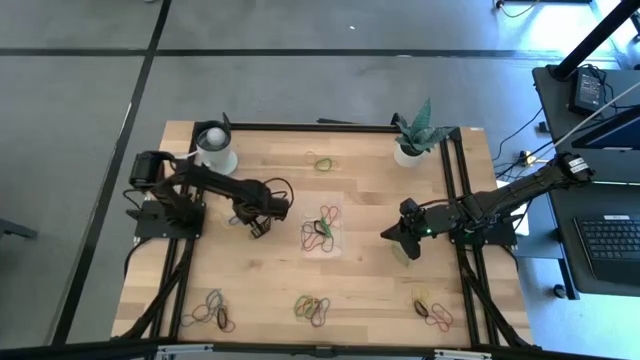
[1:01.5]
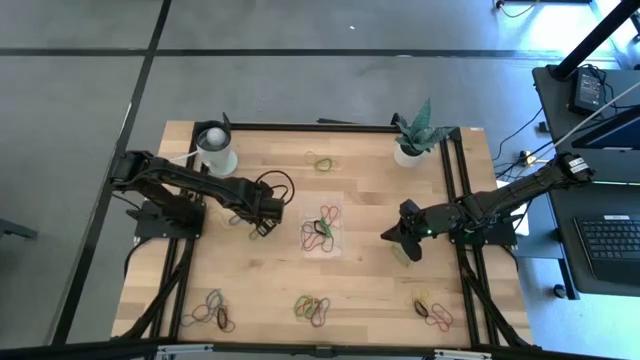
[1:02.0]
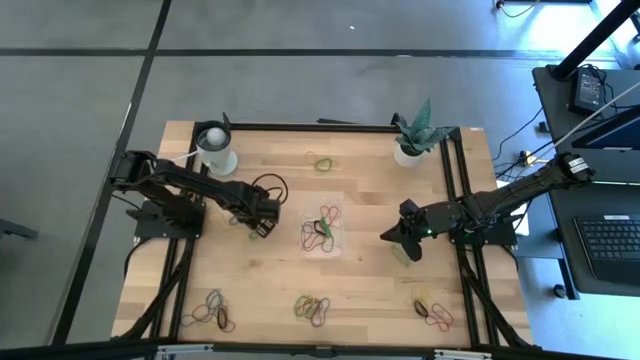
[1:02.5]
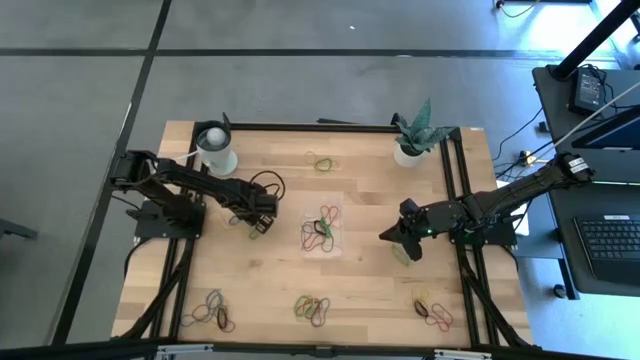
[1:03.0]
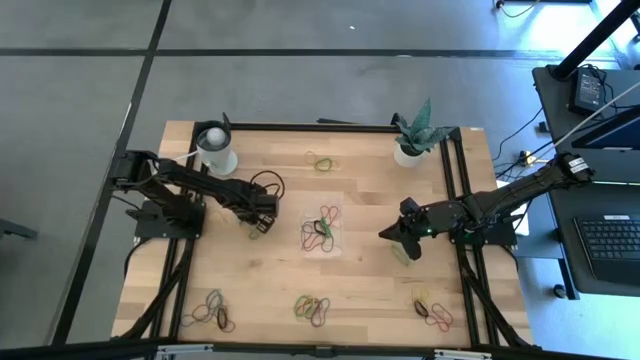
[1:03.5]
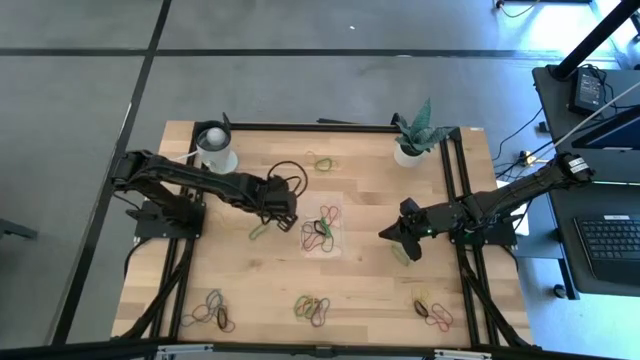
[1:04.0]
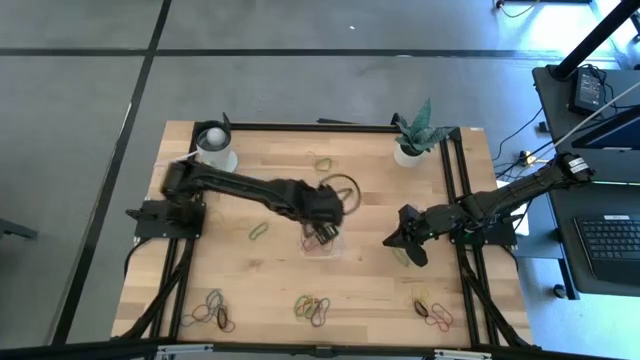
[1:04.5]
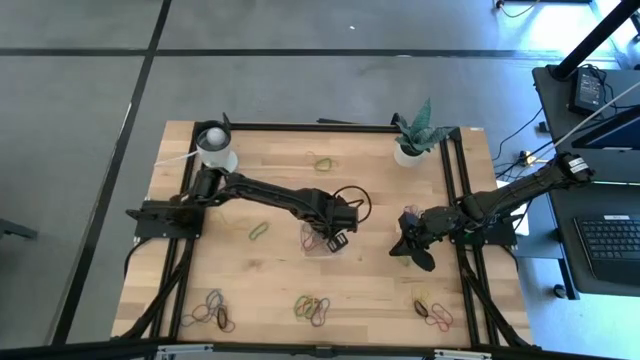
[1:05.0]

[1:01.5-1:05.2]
Task: Pick and place rubber bands into bin
Put the blue rubber band into the transparent bin

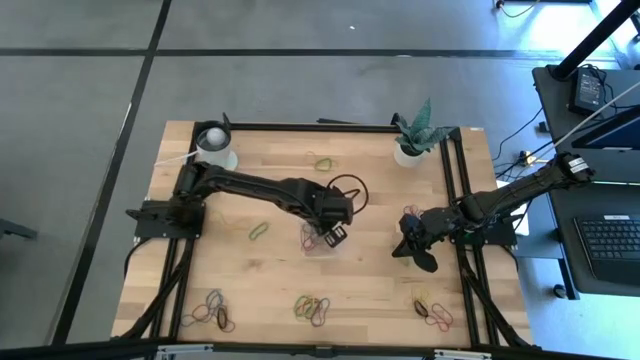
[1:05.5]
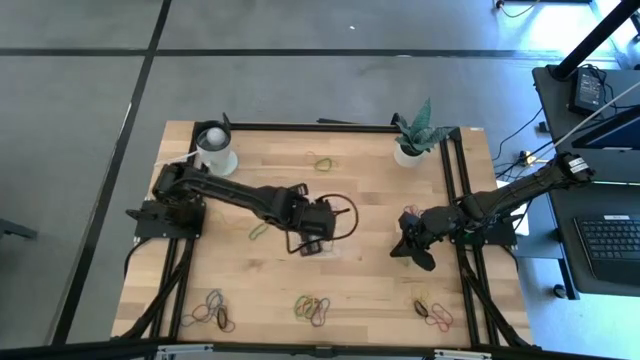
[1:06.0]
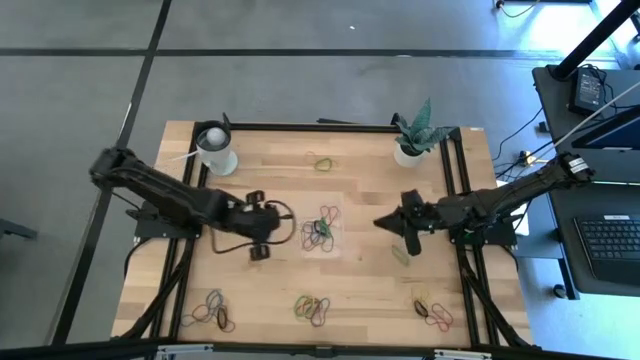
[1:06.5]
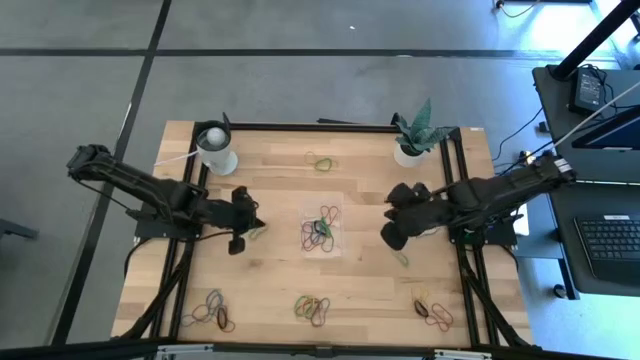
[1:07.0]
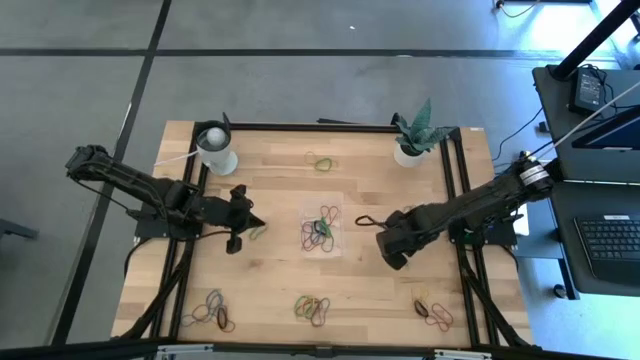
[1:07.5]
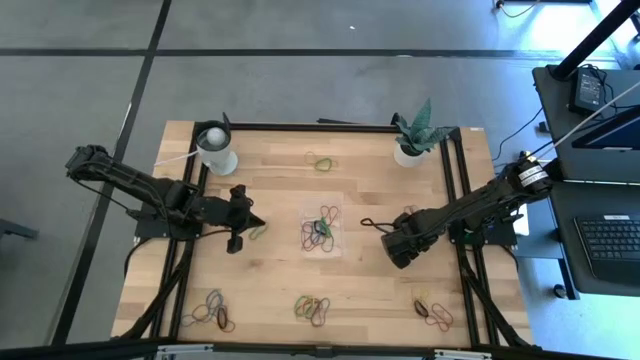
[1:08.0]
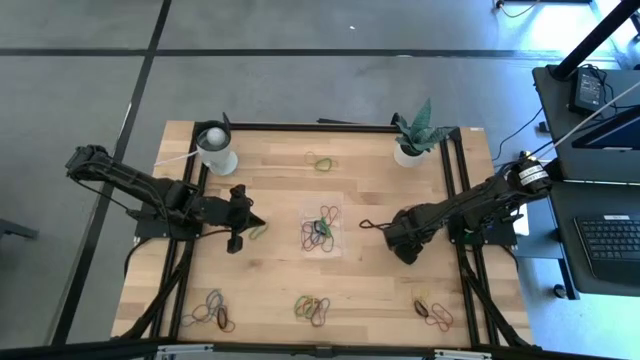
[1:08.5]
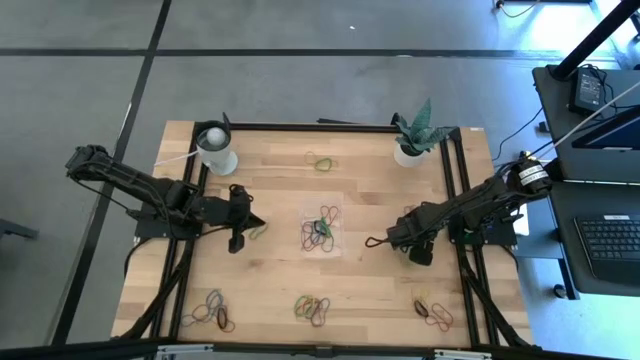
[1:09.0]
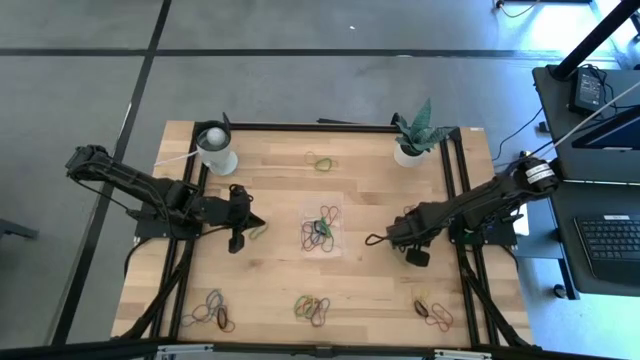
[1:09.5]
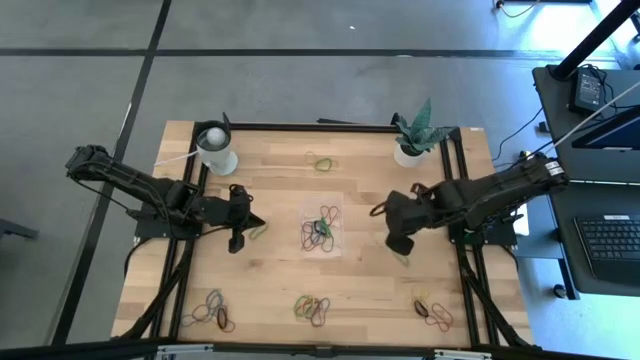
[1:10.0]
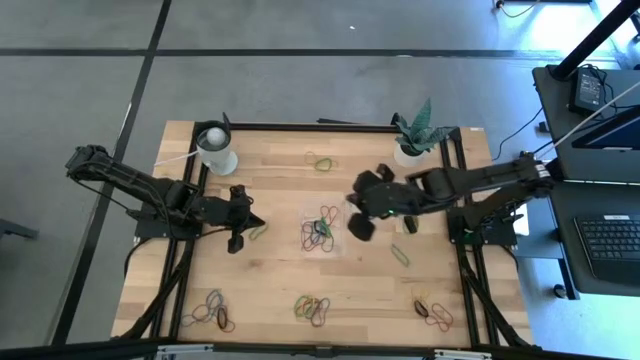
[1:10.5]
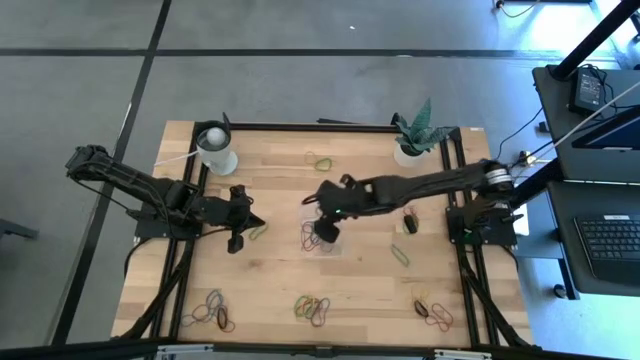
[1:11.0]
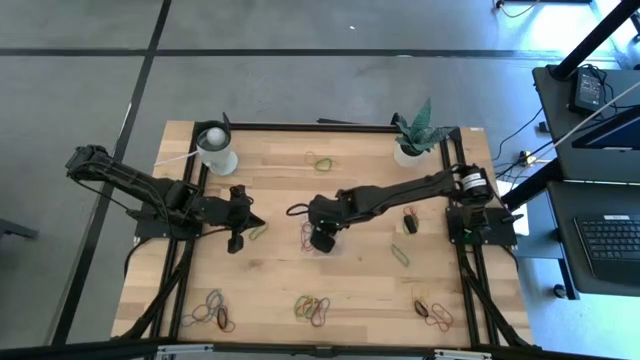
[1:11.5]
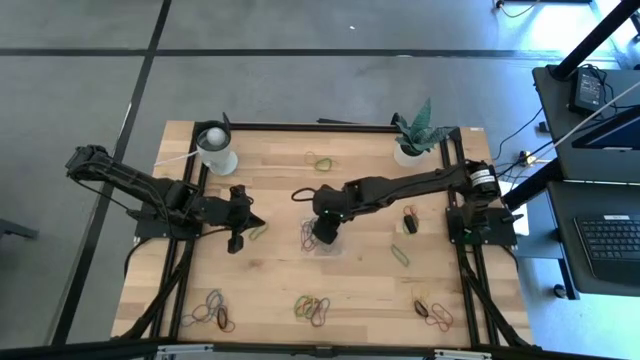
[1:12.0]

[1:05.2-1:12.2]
Put the blue rubber band into the transparent bin

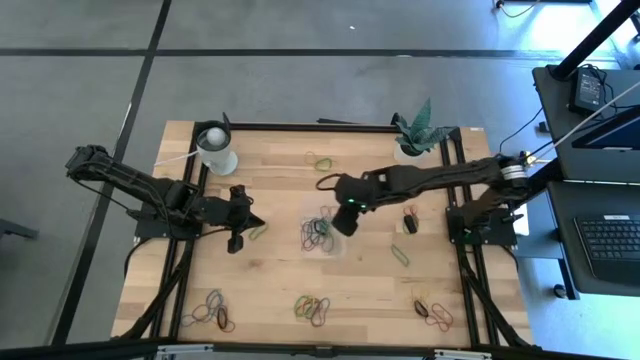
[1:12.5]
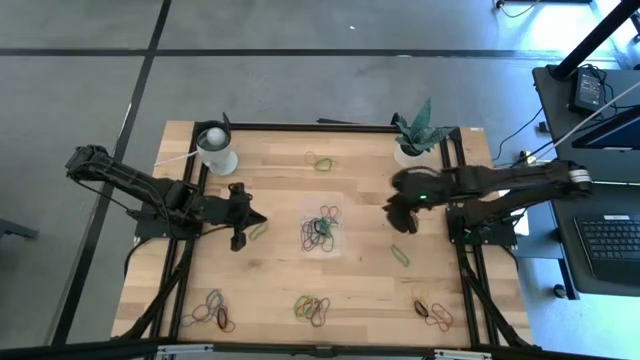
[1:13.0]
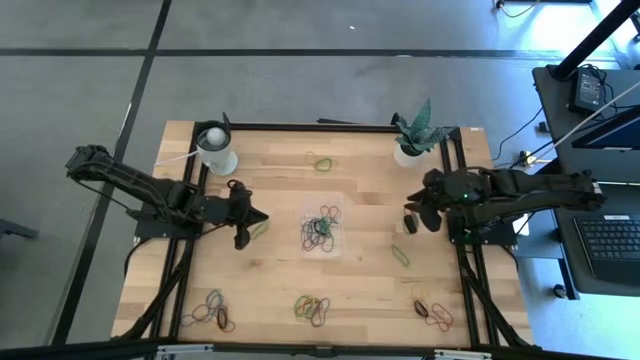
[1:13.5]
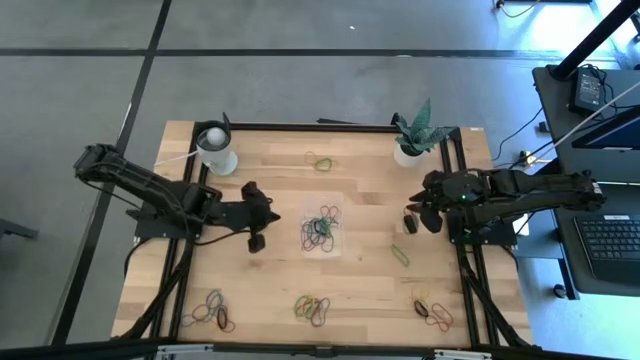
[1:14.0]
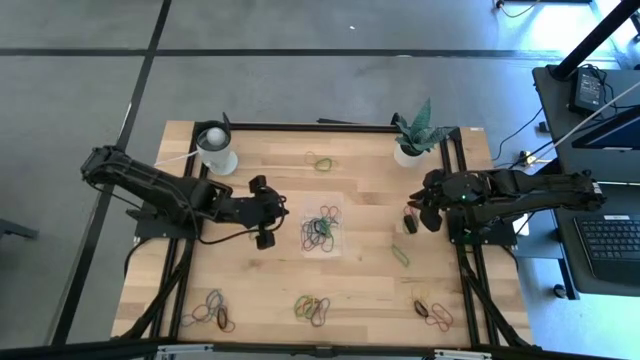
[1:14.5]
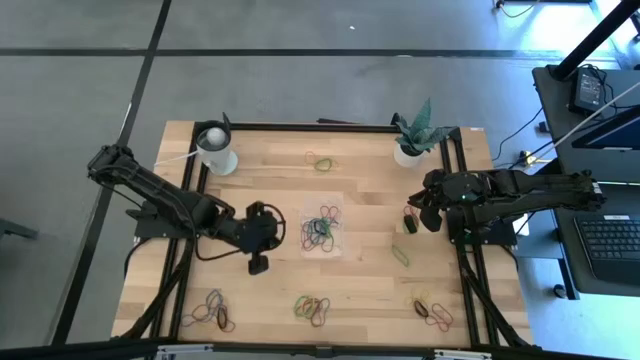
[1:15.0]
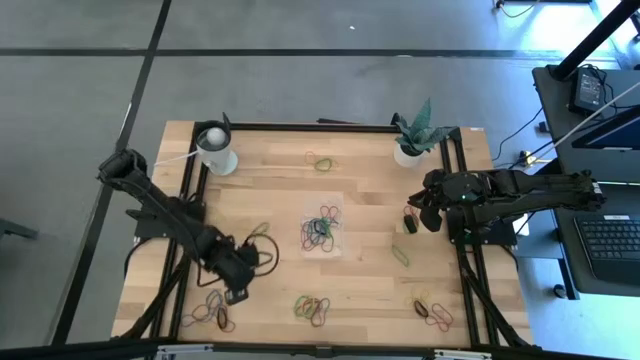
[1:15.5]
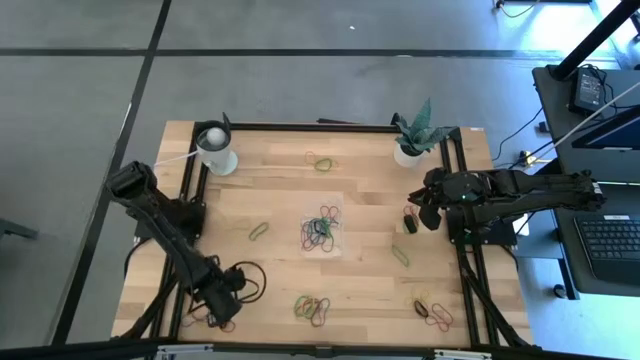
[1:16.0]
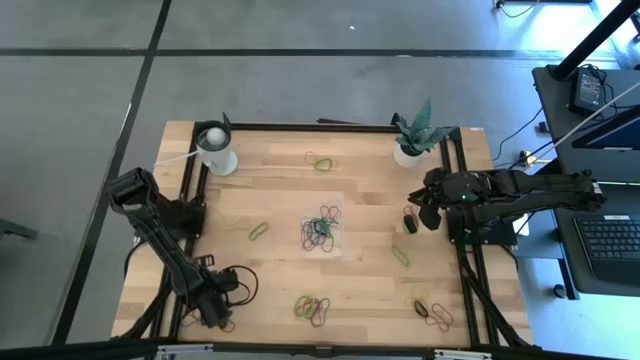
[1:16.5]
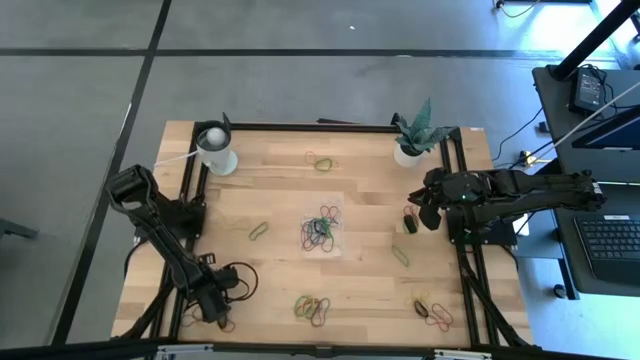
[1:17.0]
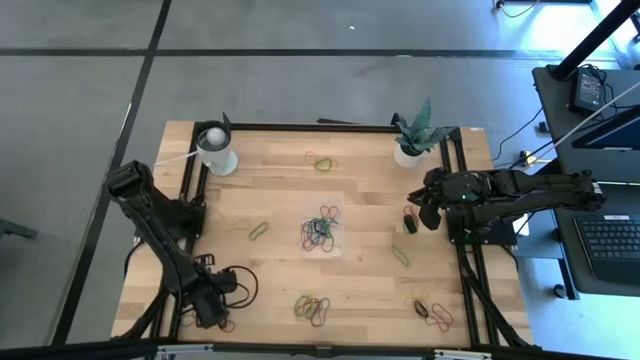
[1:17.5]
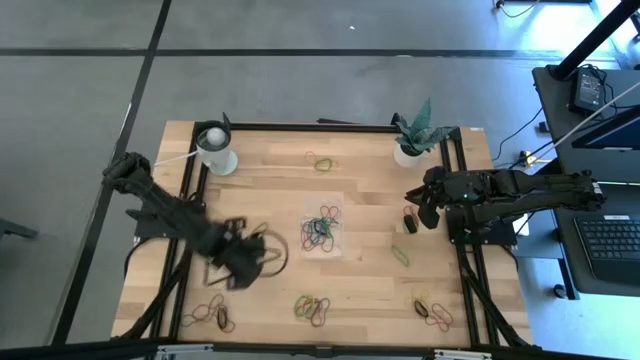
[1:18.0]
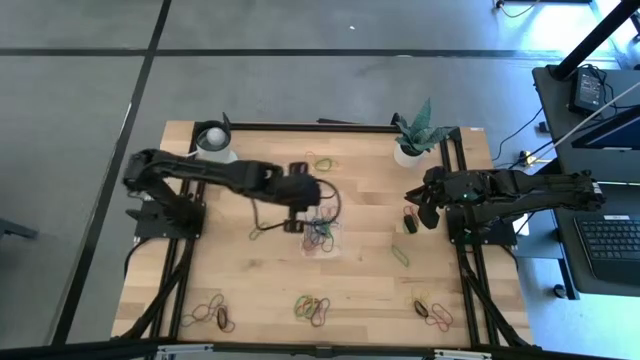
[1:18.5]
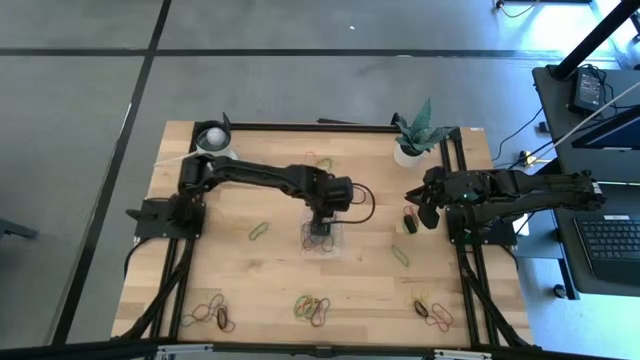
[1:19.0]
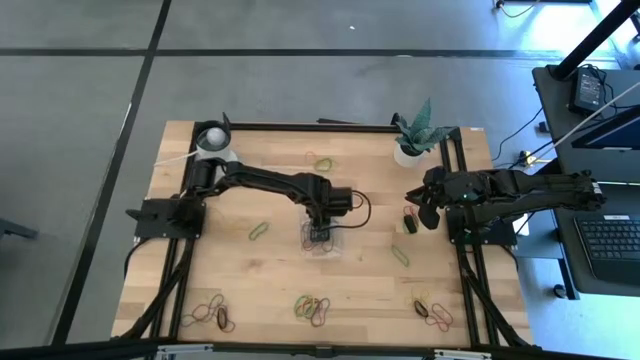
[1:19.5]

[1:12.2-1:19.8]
Put the blue rubber band into the transparent bin

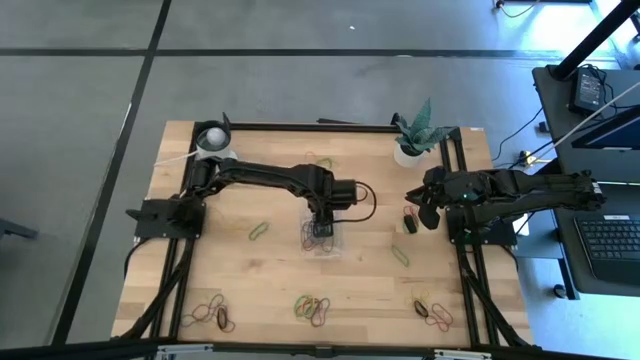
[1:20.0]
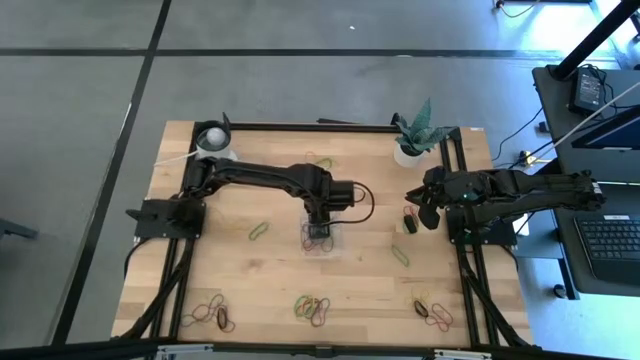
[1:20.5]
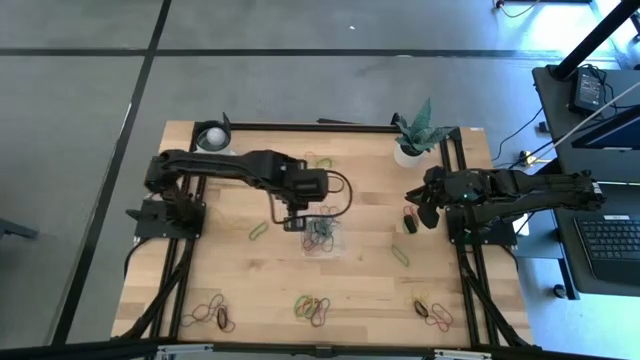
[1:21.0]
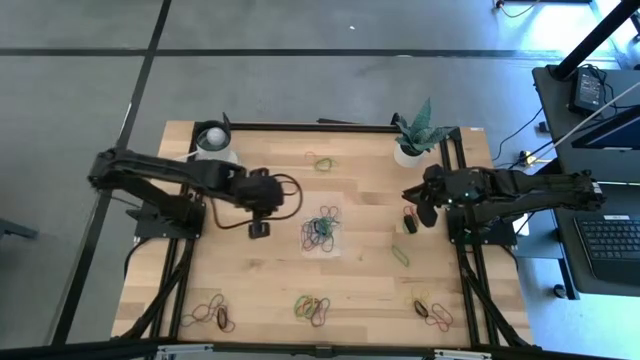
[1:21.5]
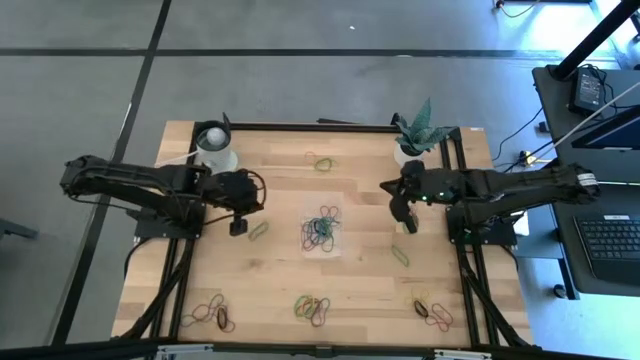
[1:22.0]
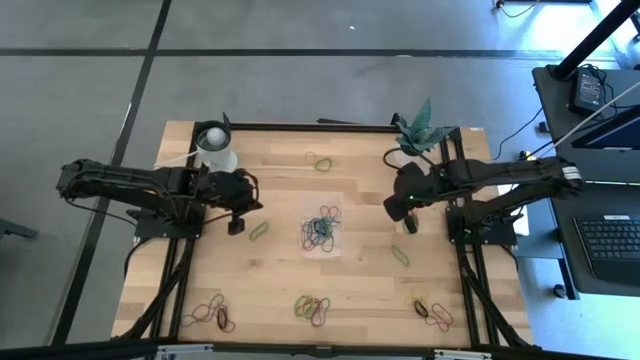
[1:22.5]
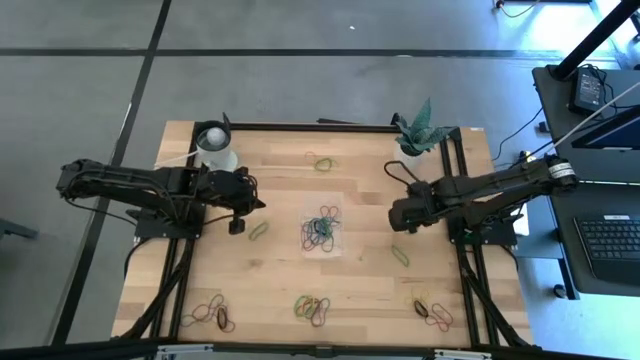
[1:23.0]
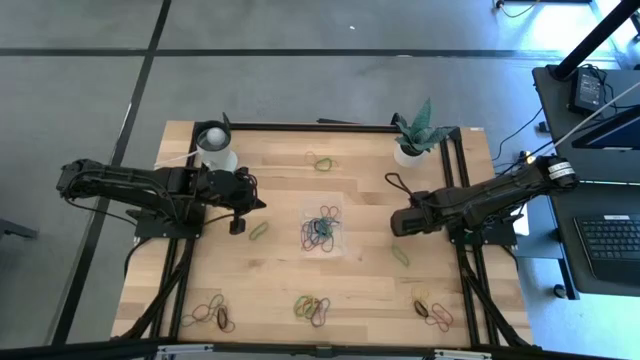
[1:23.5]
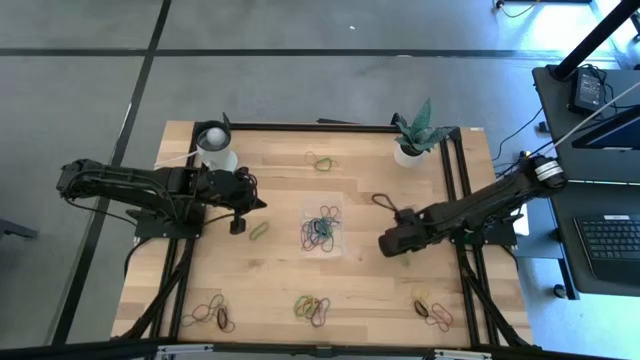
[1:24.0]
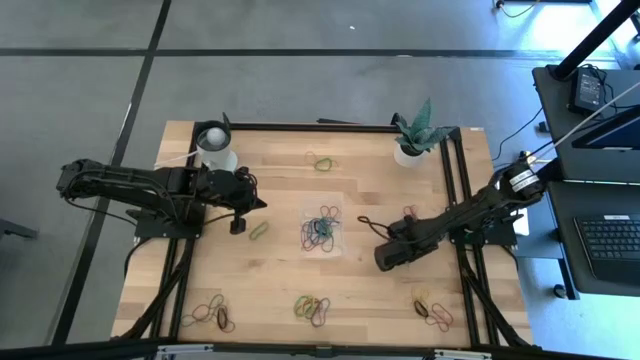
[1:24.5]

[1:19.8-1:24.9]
Put the green rubber band into the transparent bin
